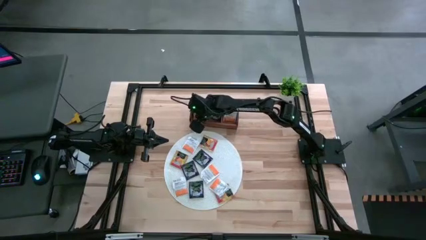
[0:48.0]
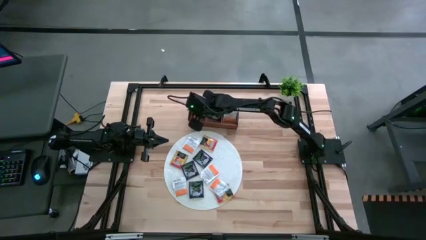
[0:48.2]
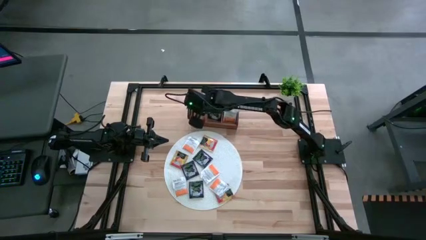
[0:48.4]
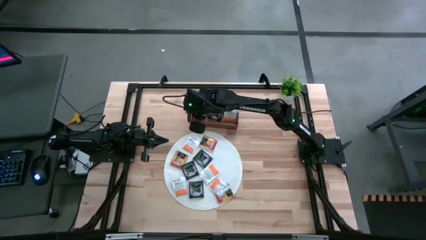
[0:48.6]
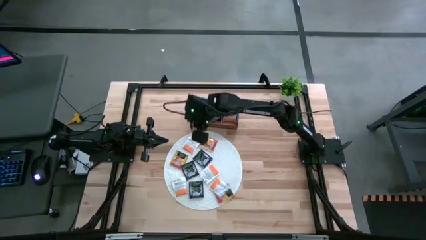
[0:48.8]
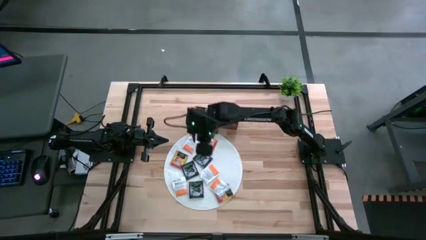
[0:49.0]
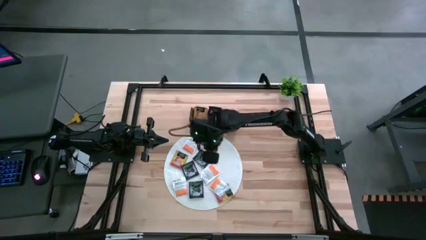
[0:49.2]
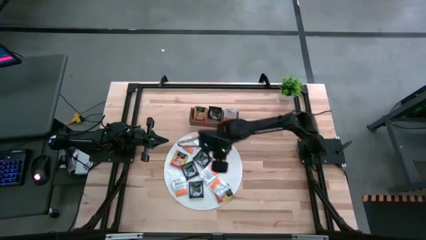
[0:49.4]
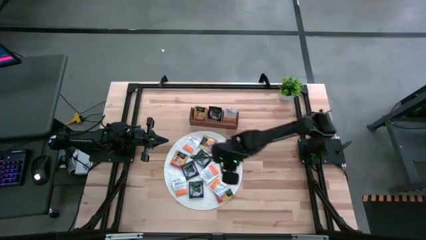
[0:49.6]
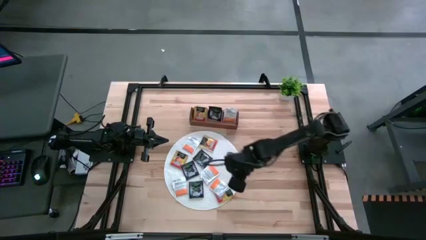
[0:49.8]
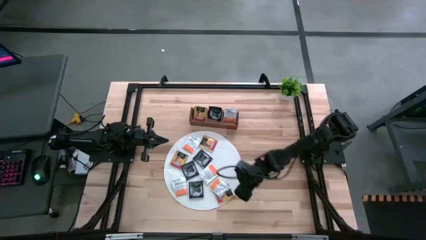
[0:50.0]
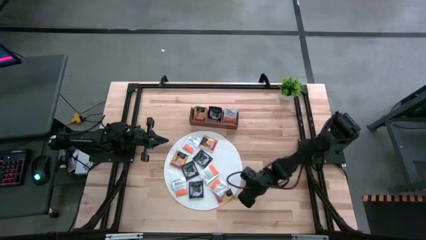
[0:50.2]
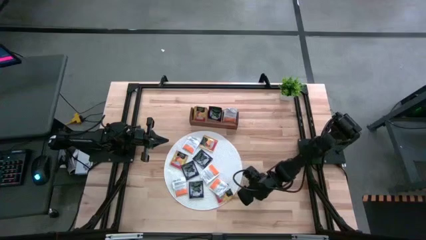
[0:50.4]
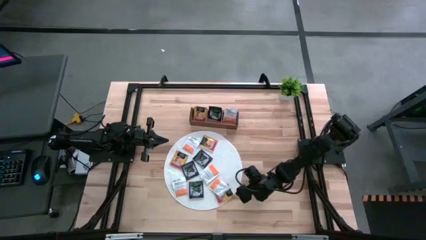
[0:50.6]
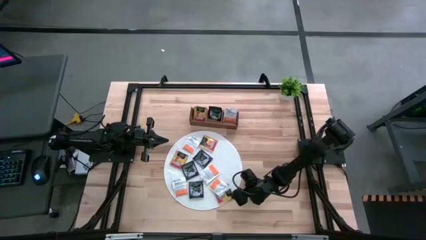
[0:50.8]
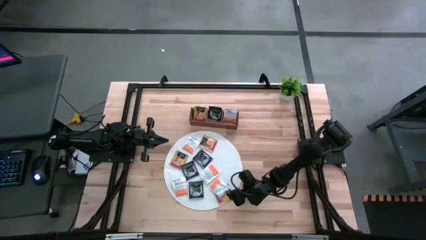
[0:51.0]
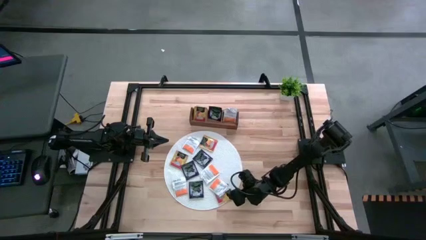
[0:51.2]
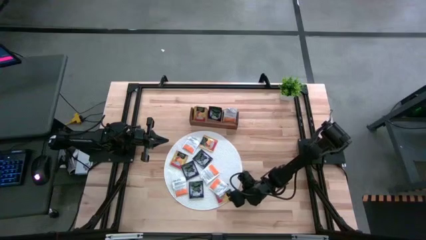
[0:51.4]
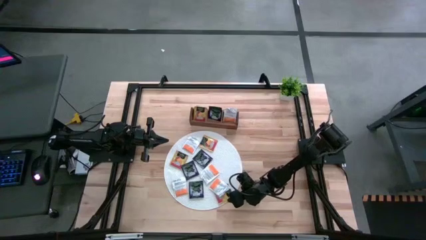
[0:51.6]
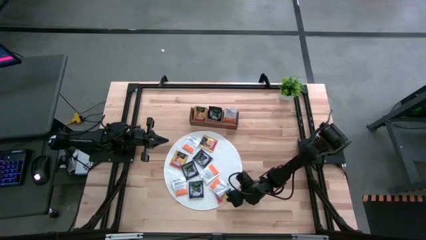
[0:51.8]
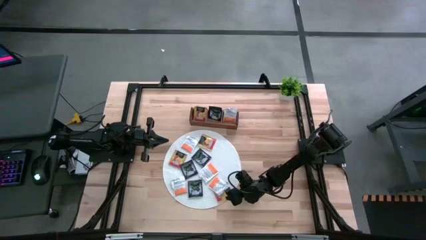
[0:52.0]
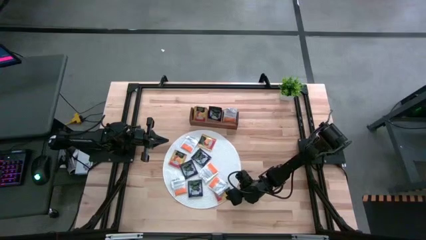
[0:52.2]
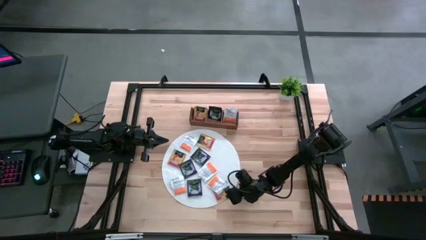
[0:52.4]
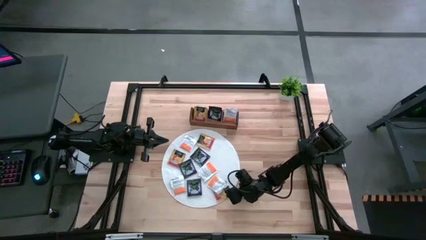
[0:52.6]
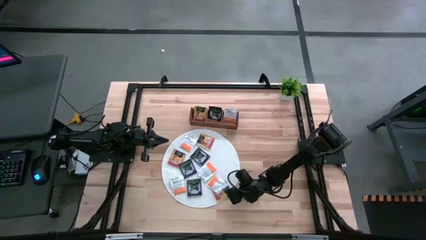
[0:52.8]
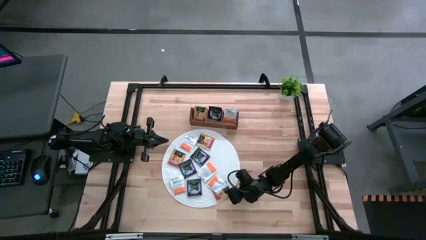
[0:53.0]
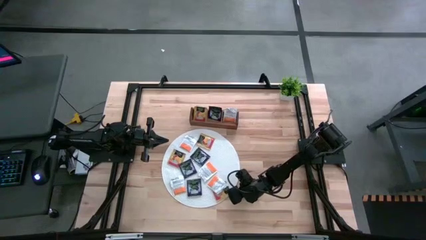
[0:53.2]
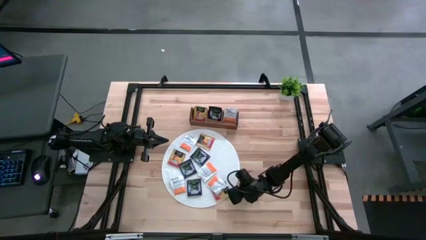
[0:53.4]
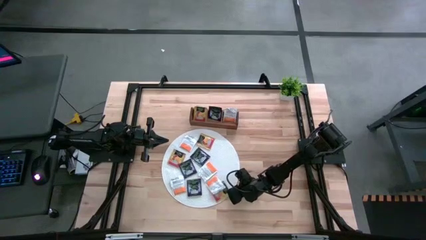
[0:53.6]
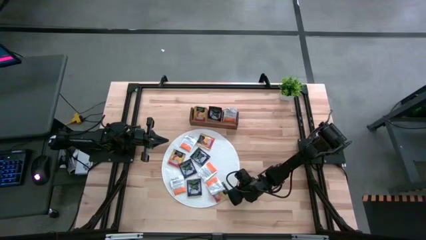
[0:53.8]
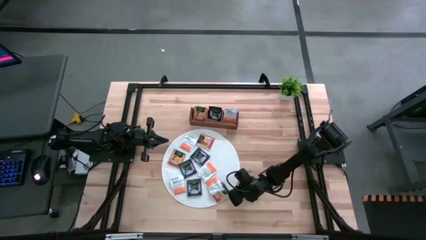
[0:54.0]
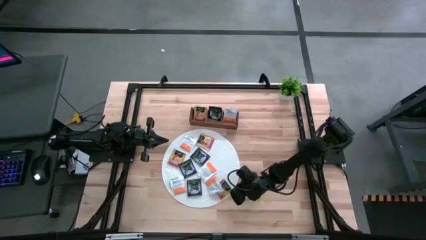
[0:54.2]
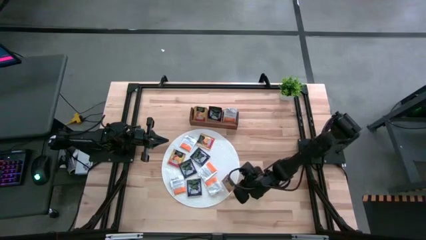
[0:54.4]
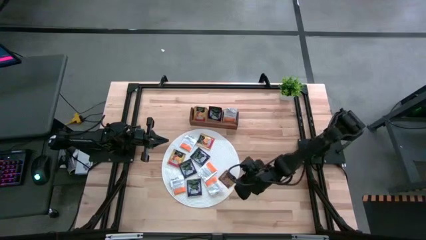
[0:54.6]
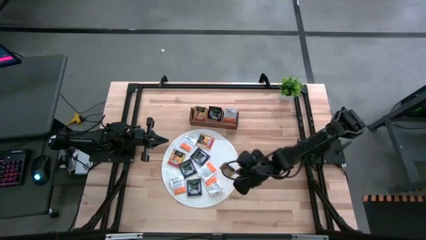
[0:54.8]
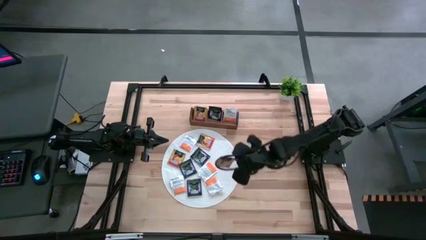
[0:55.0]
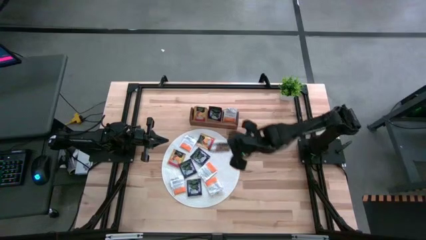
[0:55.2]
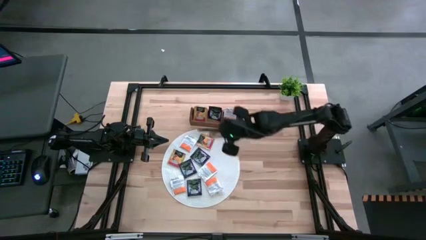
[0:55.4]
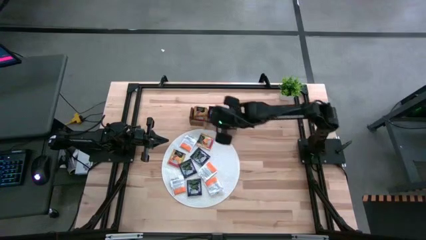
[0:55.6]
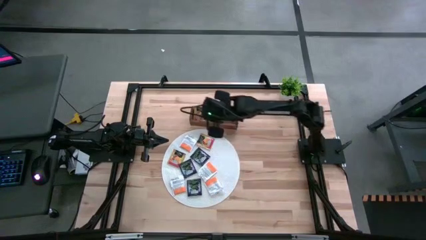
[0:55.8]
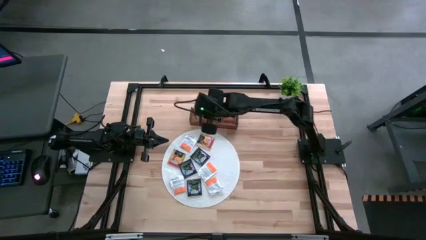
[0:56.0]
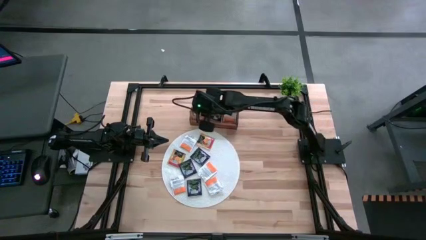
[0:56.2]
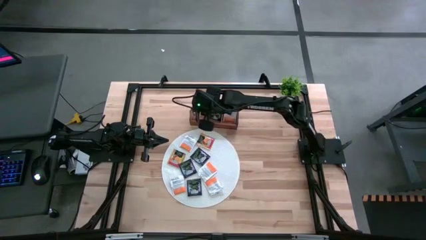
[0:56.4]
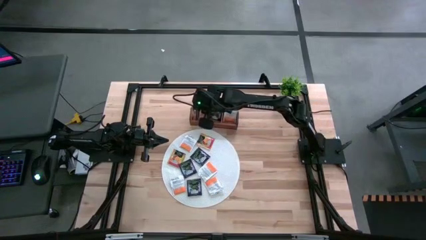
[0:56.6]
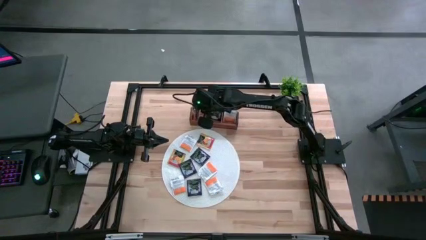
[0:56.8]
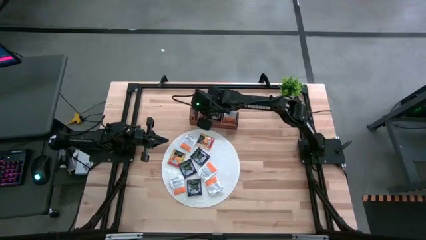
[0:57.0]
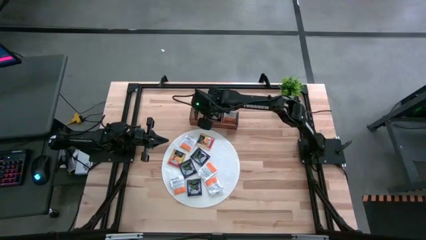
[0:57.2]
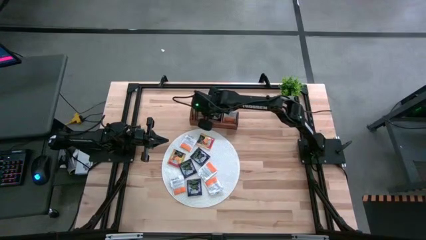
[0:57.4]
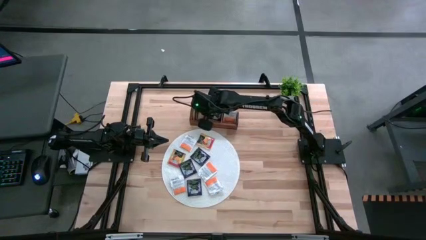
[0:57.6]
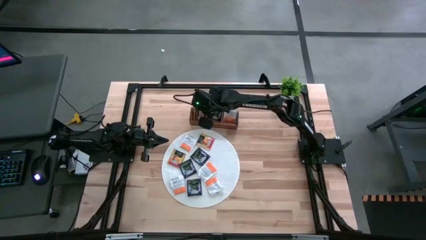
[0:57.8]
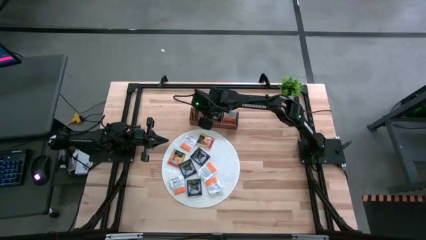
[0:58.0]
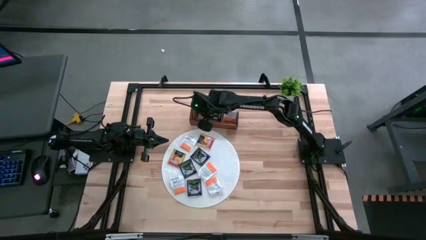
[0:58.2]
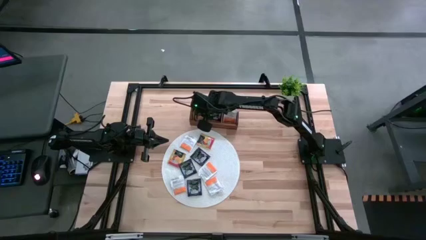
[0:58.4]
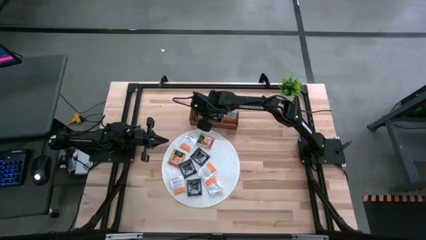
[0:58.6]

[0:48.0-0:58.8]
Task: Pick & Place Tea
Put the yellow tea bag into the left section of the wooden organizer

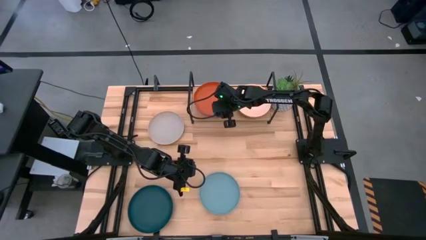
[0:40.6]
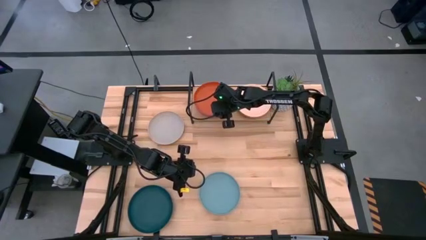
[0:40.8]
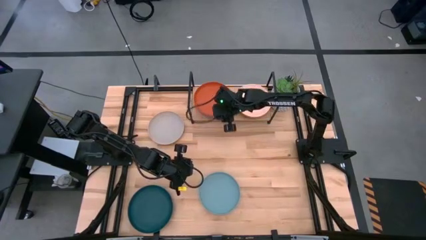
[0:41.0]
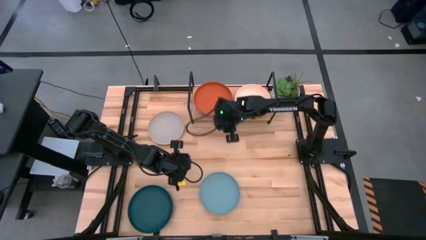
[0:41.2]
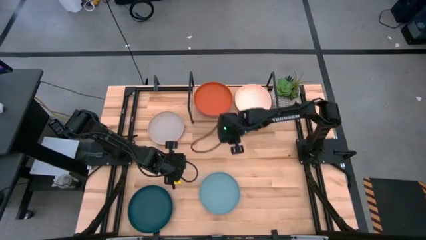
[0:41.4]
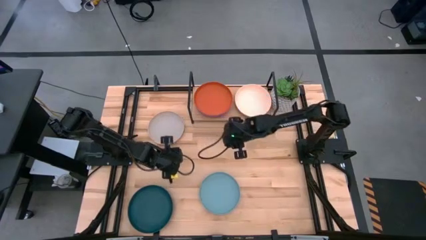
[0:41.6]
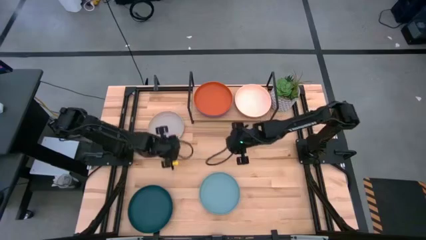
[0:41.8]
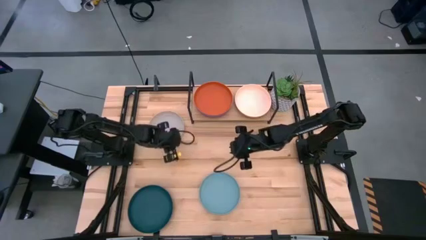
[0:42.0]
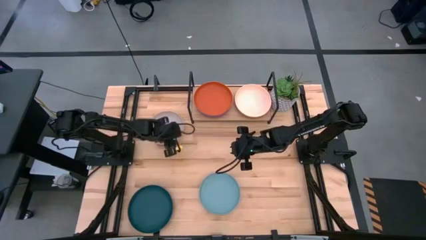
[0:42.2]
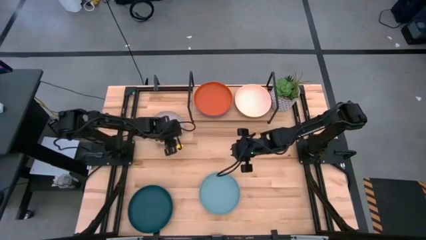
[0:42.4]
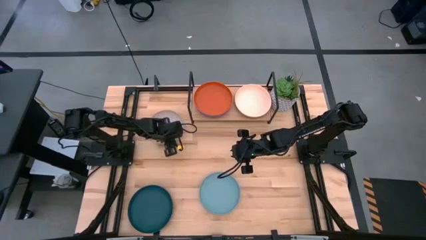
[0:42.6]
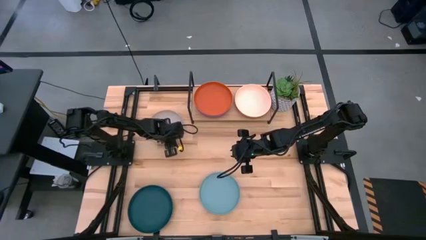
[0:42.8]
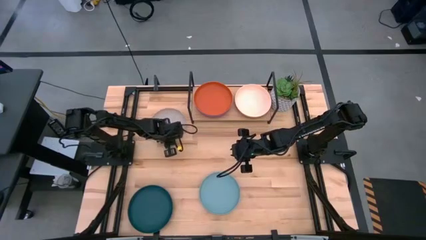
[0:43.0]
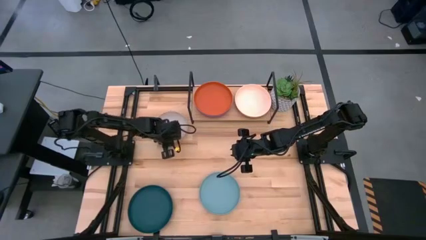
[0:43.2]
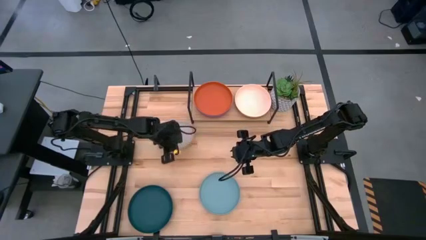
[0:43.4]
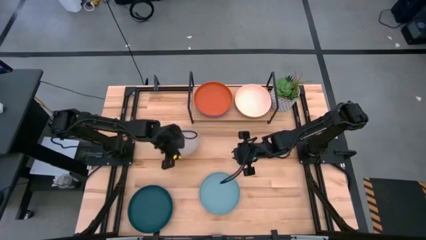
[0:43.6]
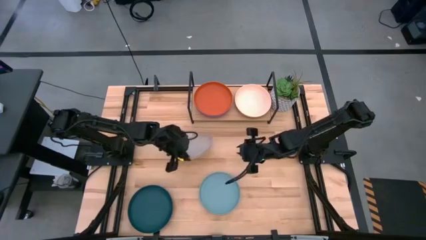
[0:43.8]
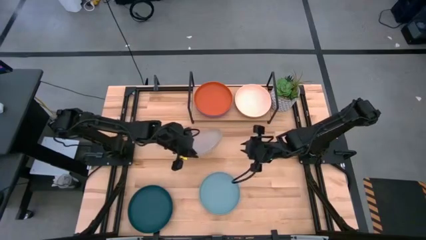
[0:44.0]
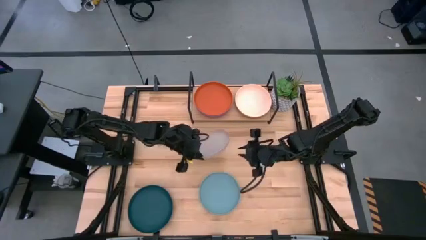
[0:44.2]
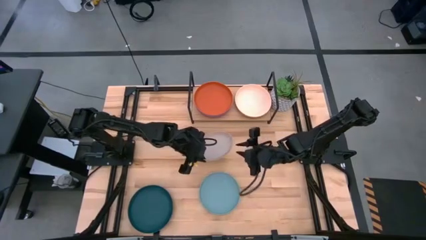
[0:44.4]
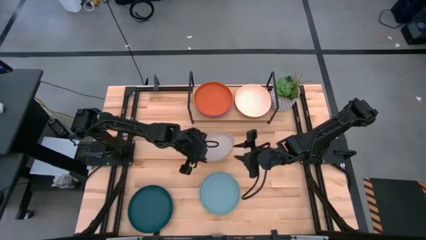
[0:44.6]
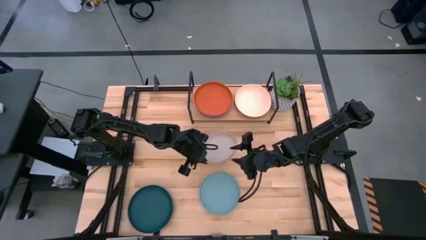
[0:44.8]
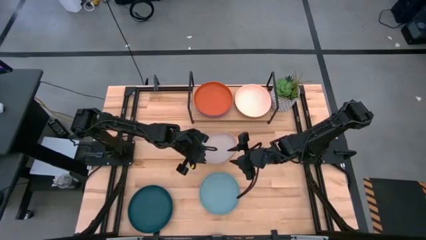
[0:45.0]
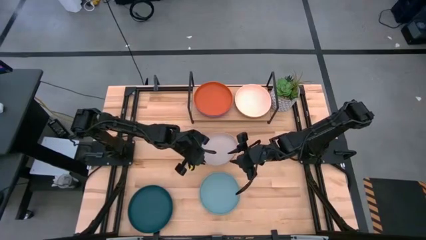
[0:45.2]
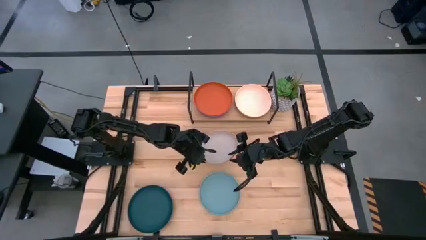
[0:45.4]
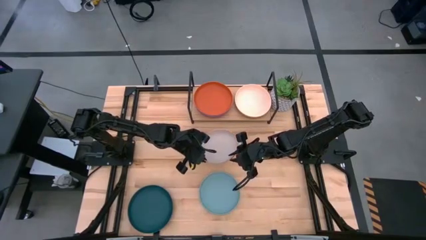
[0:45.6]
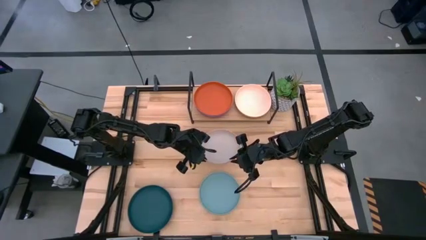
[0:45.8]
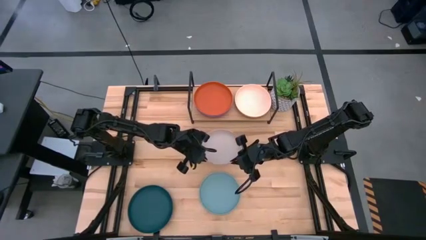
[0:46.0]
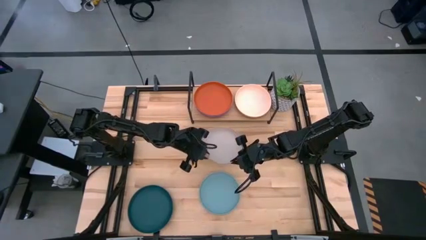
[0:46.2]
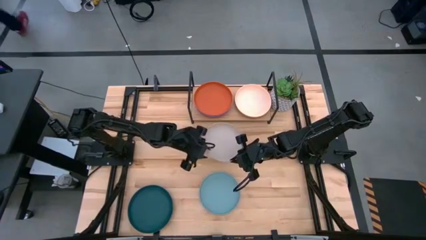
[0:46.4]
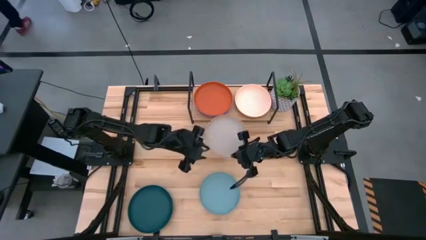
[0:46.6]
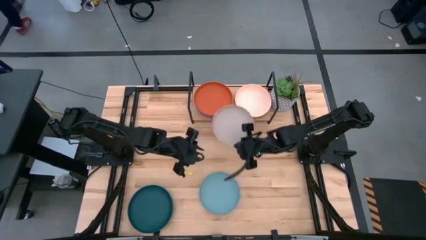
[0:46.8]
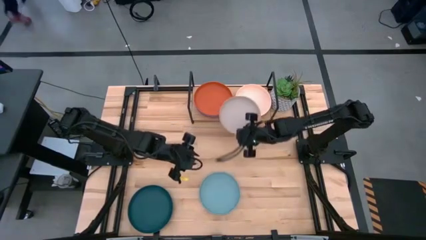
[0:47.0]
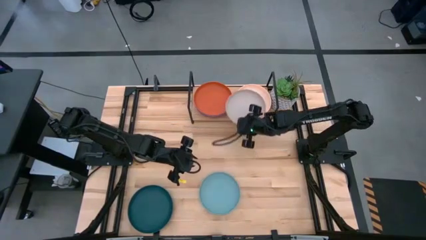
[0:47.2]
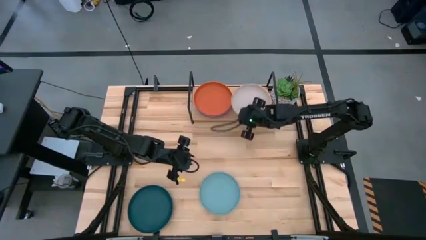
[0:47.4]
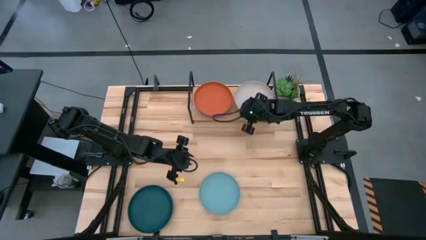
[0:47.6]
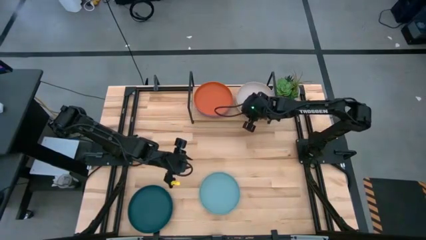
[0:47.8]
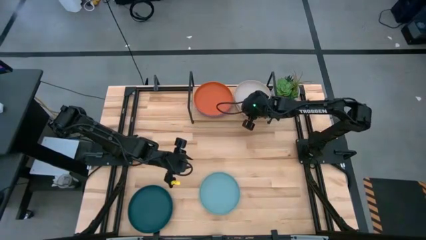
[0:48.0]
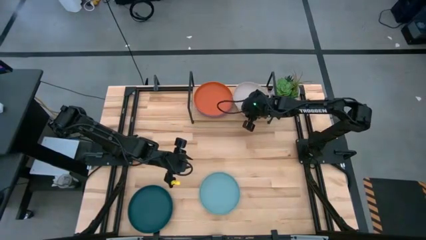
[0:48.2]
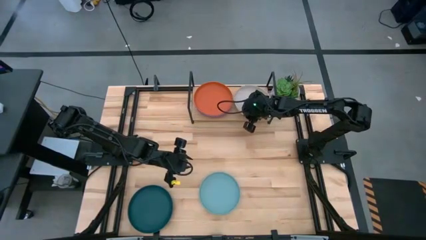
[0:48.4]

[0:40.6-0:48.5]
Task: Place and stack plates onto a shelf
Stack the gray plate on top of the white plate on the shelf
